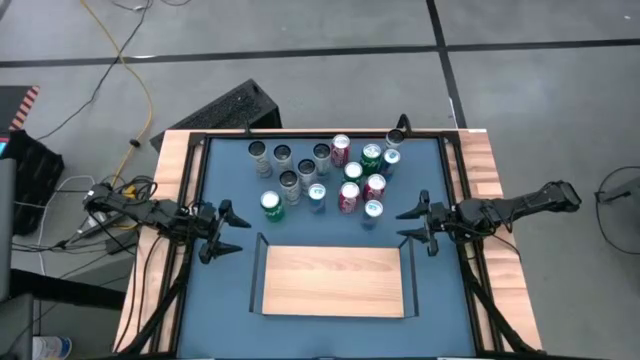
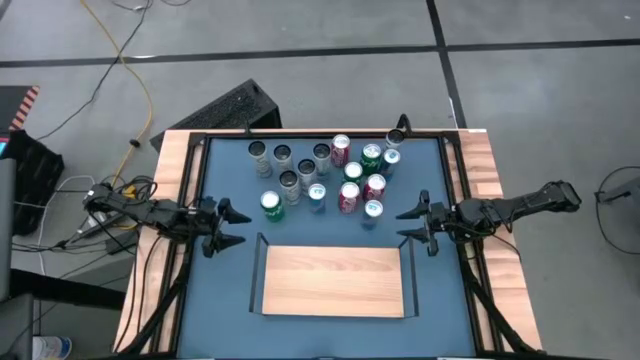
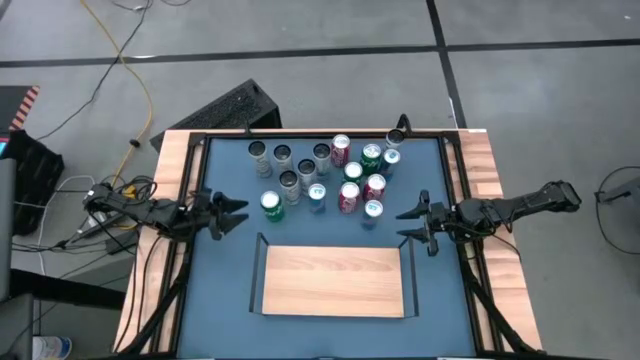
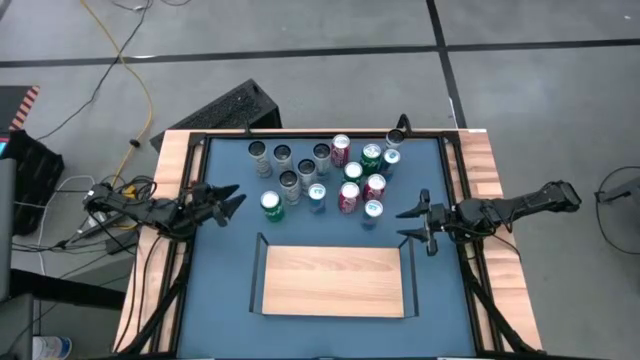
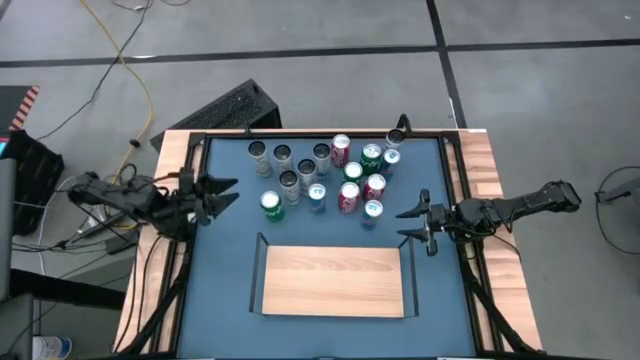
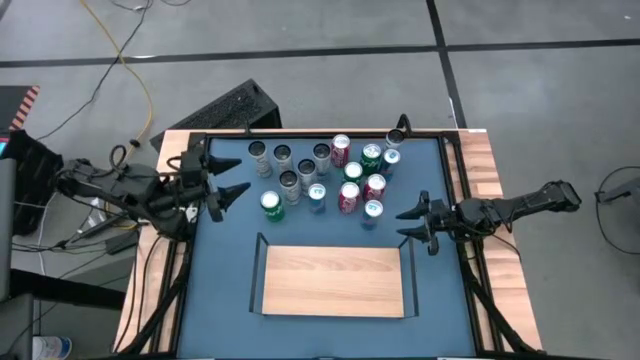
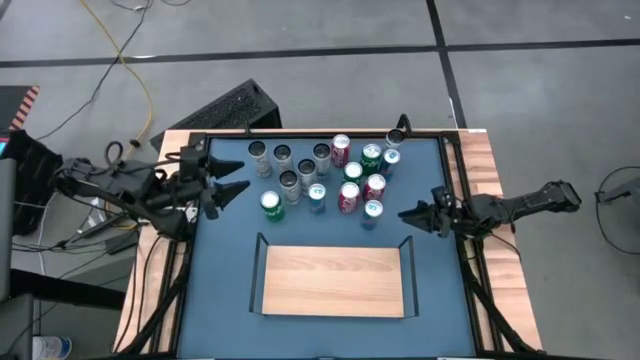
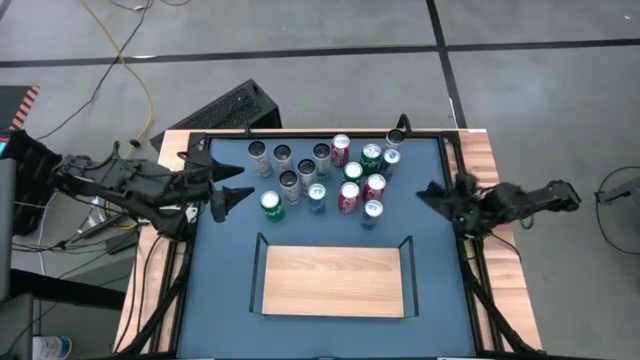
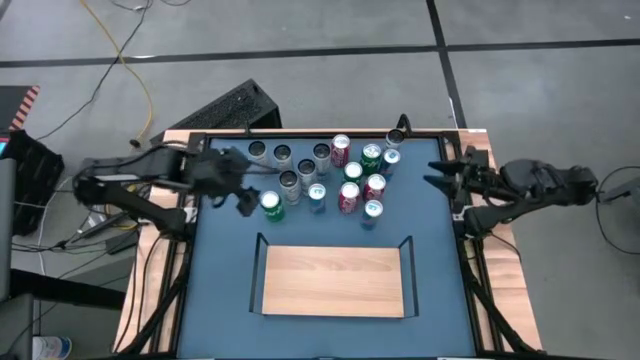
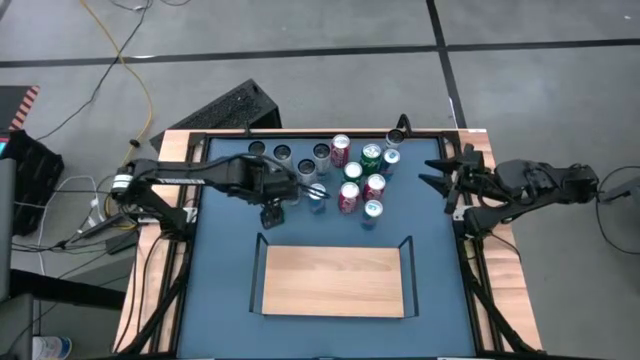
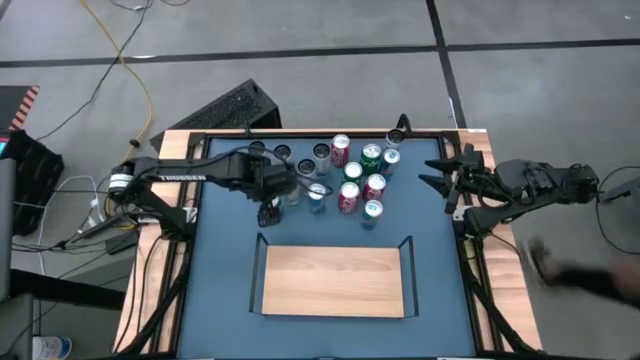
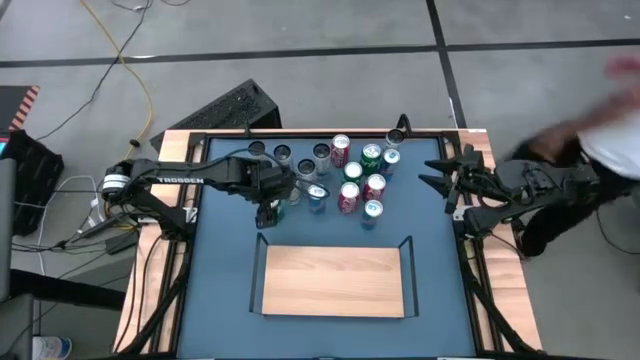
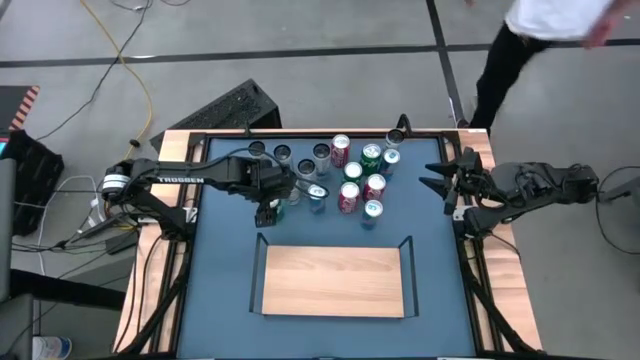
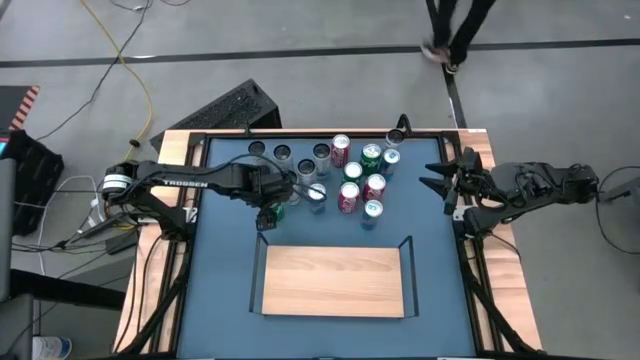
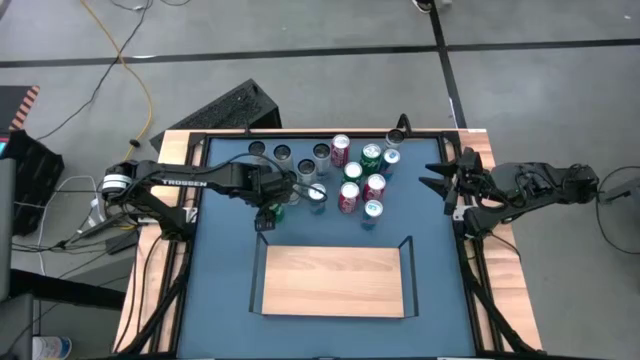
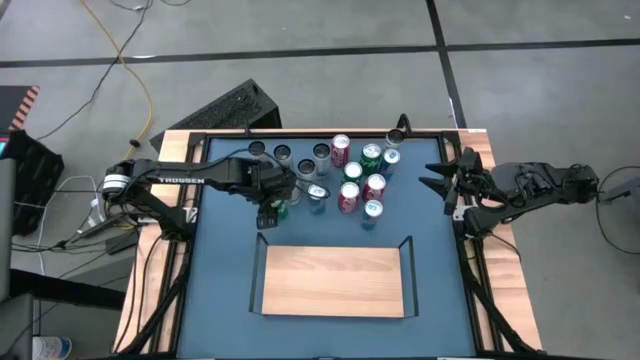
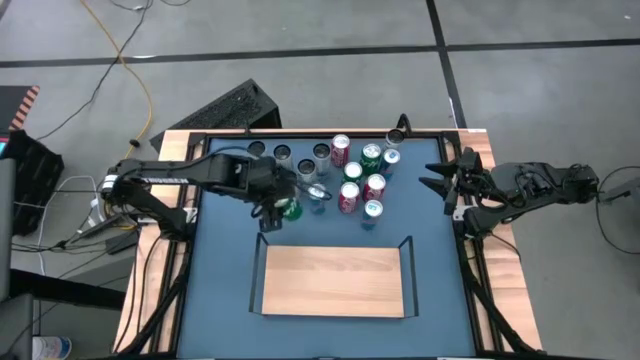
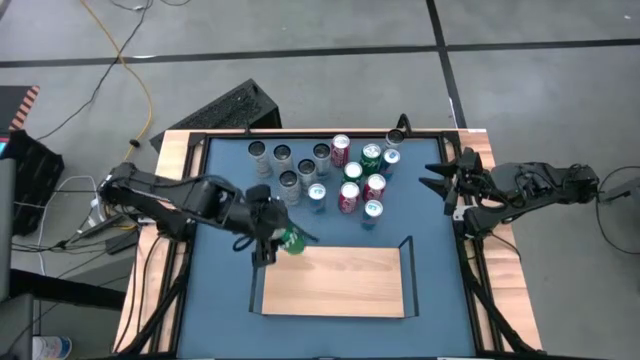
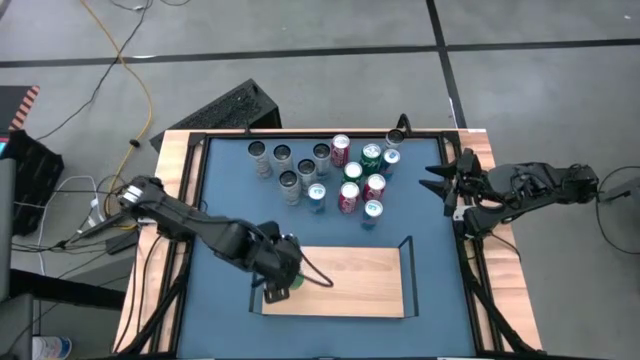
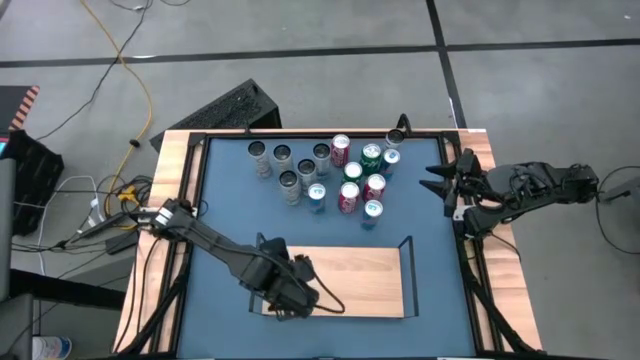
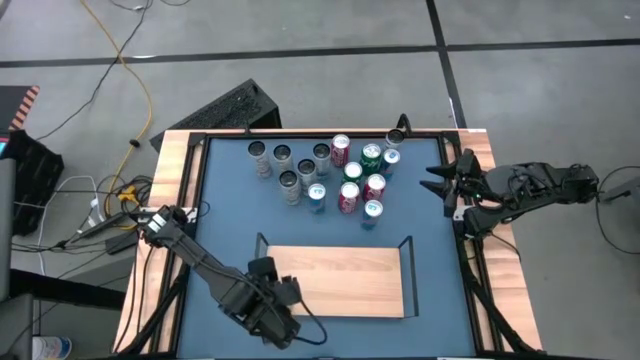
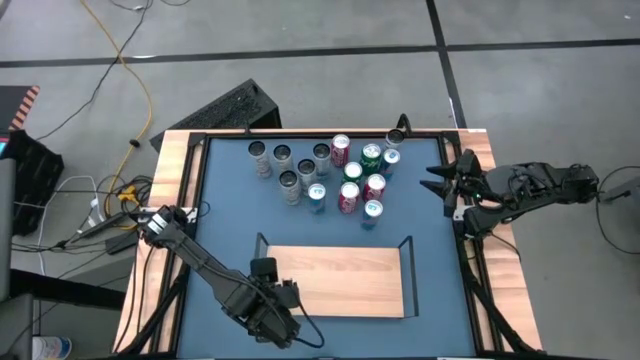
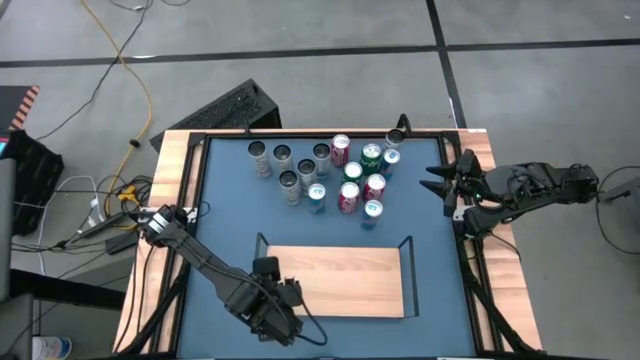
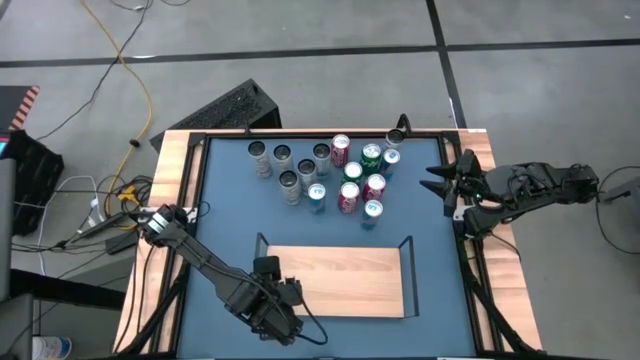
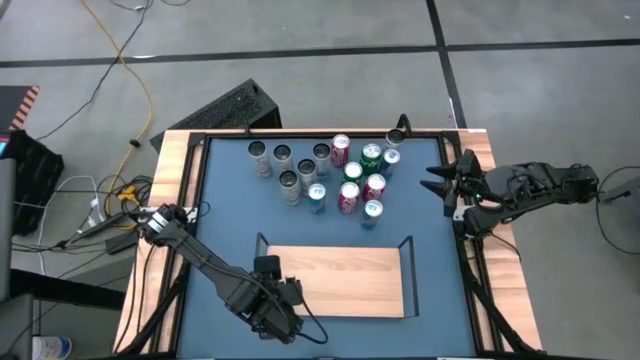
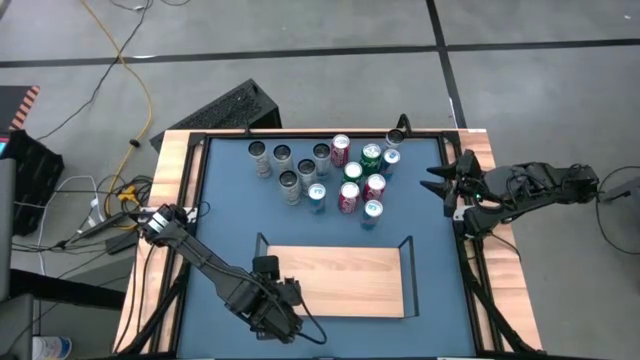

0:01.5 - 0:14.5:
Task: Place canned beverage on shelf
Put the bottom left green soda can on the shelf

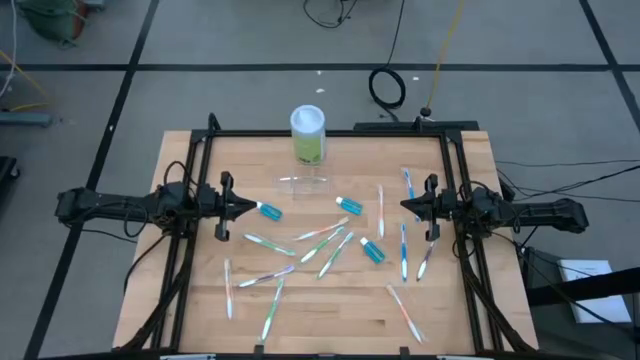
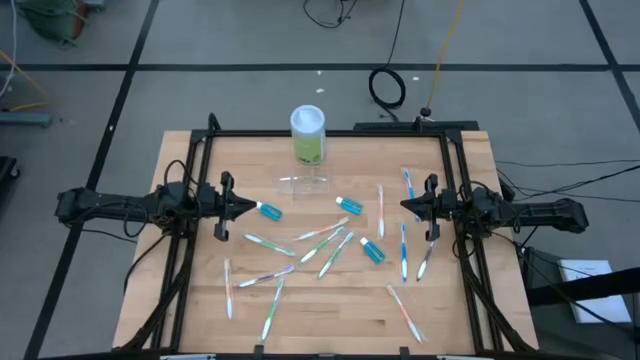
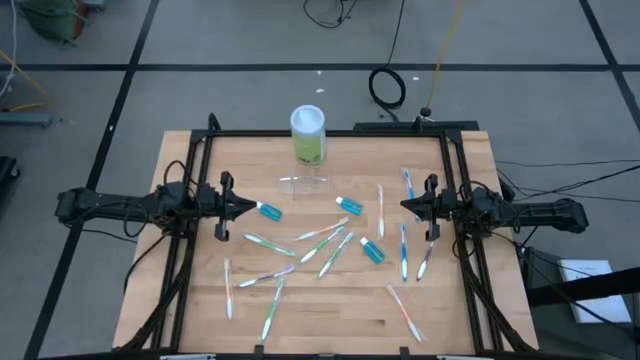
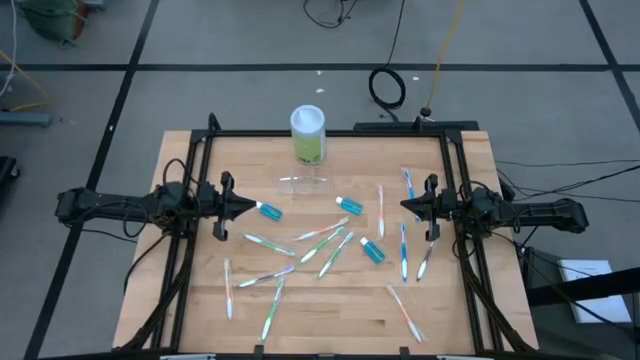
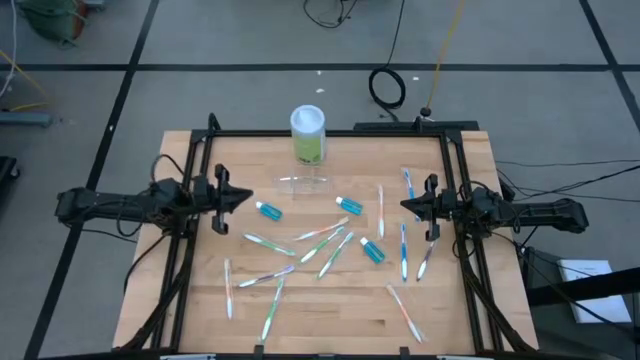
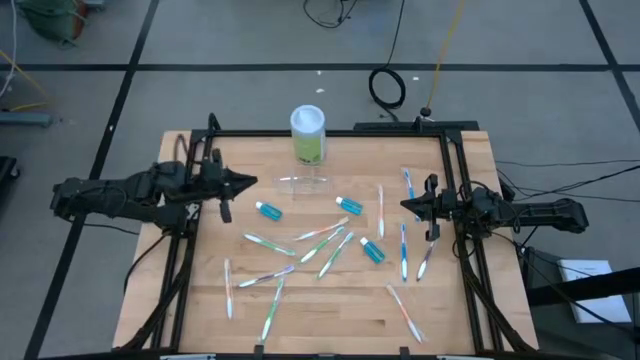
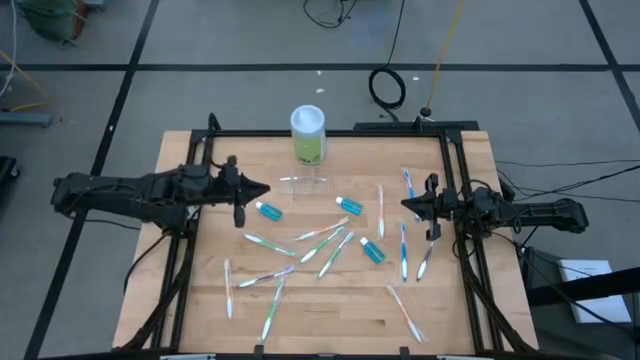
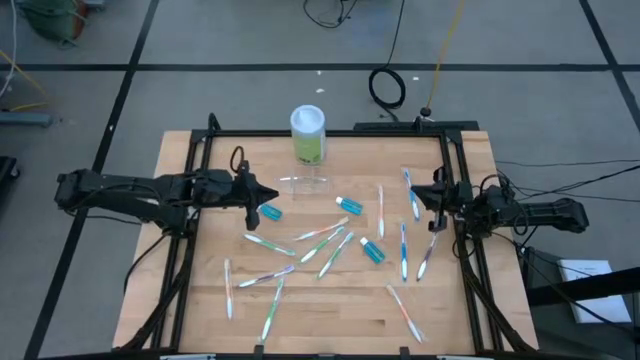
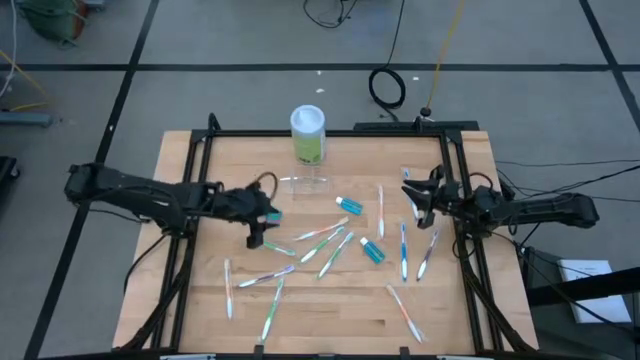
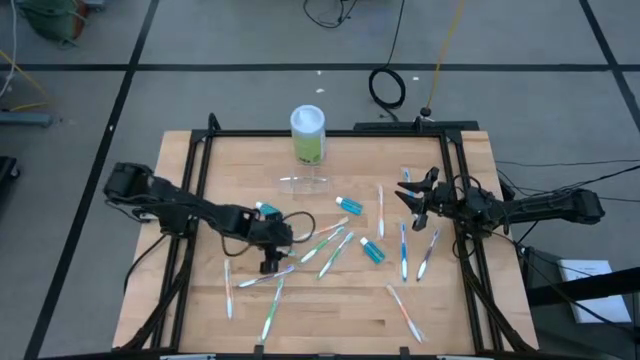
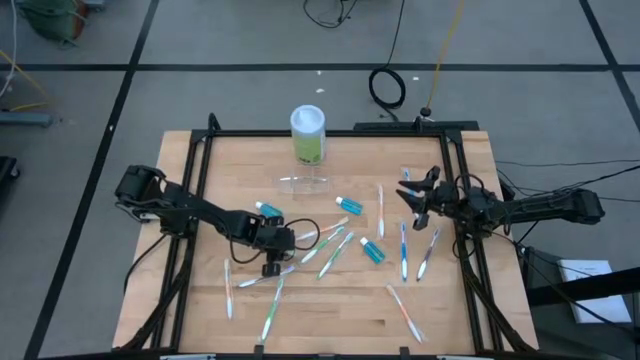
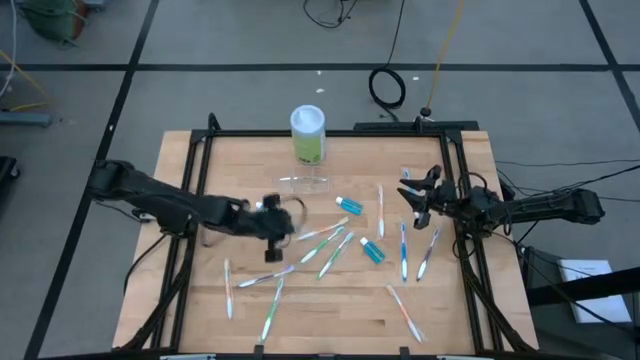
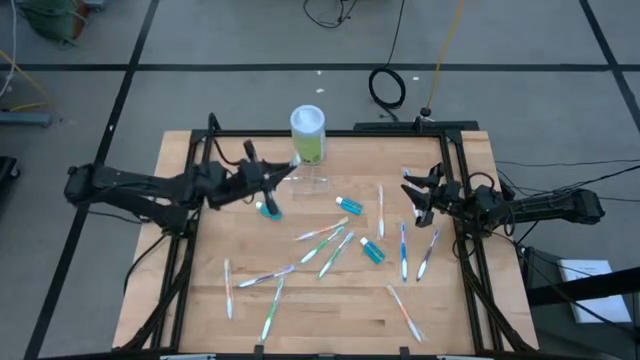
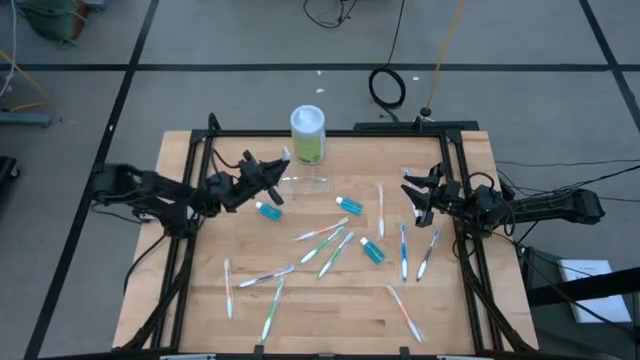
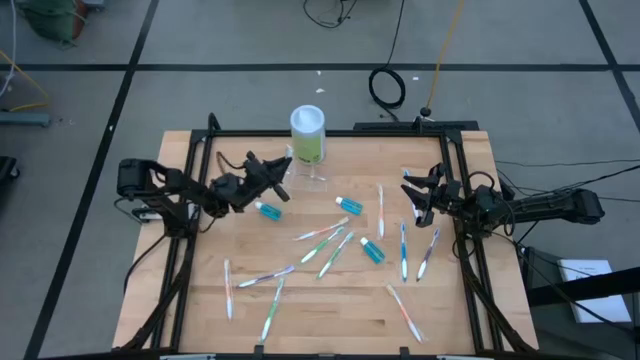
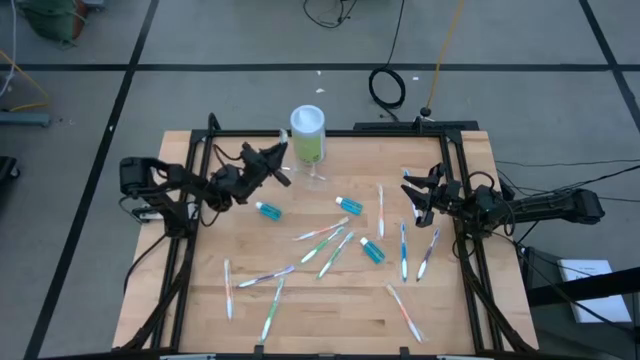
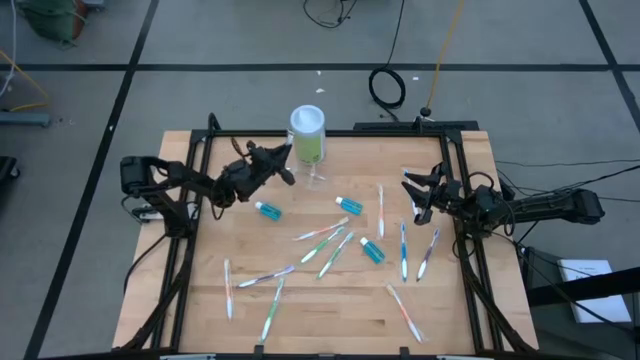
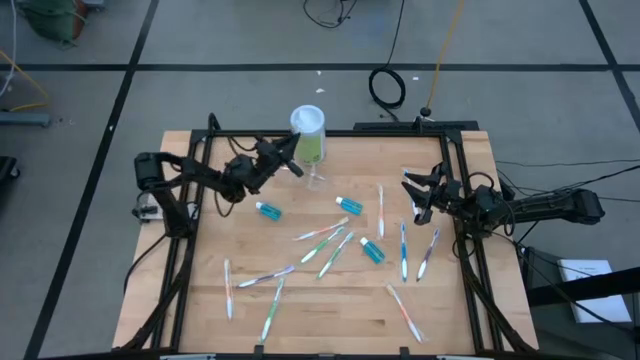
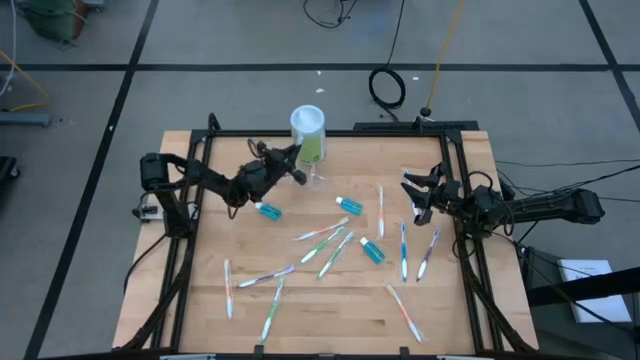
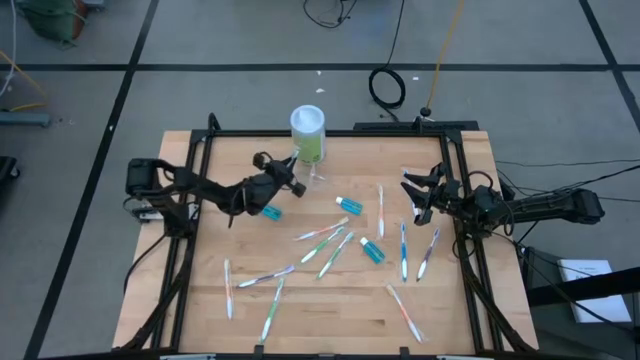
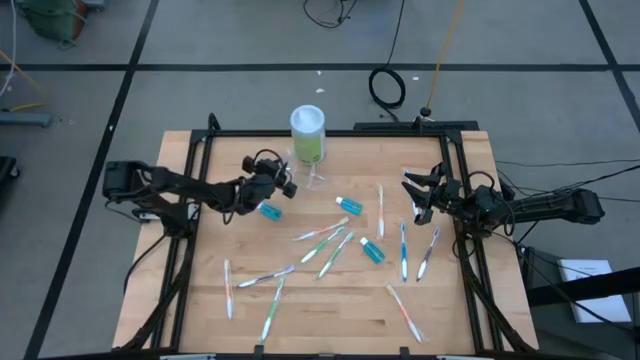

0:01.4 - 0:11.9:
Task: Pick & Place toothbrushing station
Put the green toothbrush into the left of the transparent organizer
